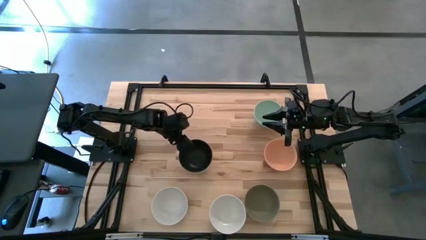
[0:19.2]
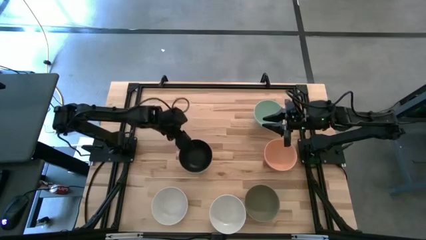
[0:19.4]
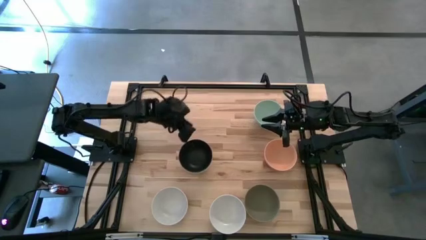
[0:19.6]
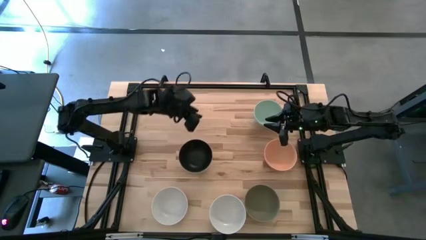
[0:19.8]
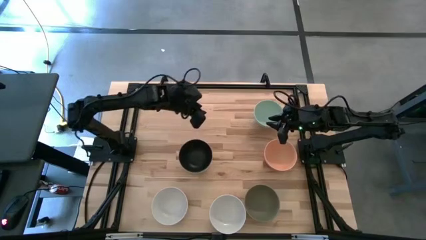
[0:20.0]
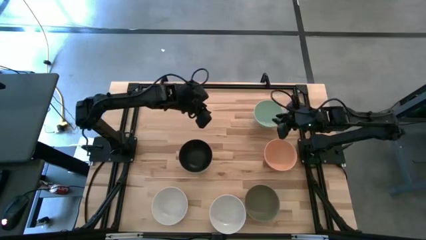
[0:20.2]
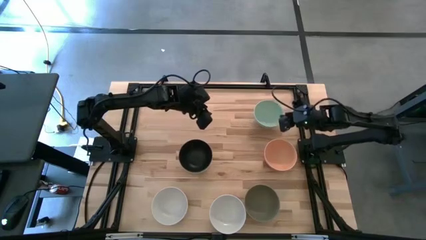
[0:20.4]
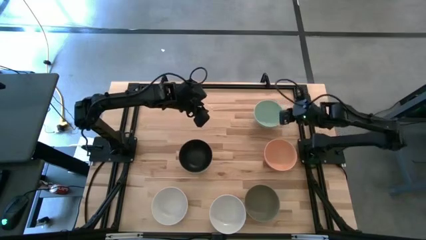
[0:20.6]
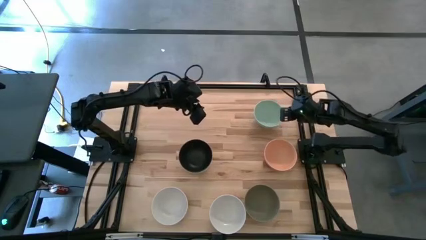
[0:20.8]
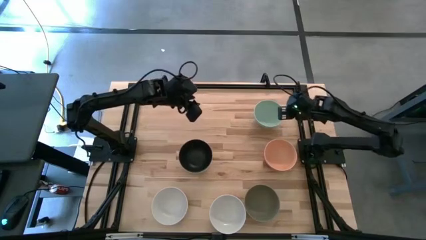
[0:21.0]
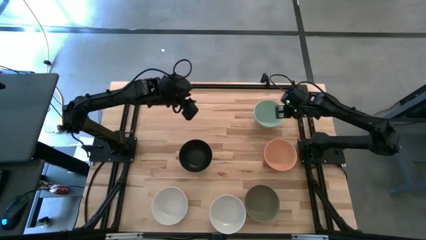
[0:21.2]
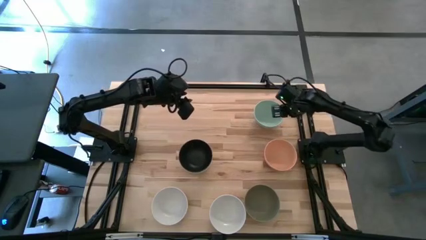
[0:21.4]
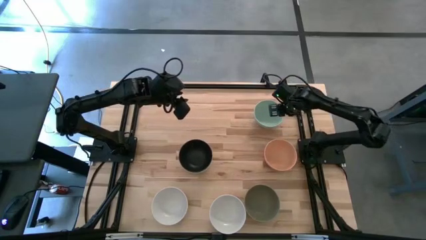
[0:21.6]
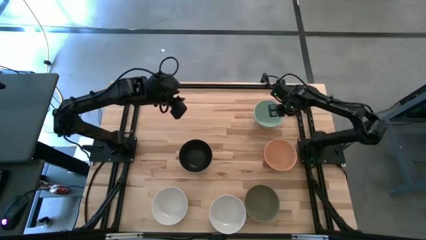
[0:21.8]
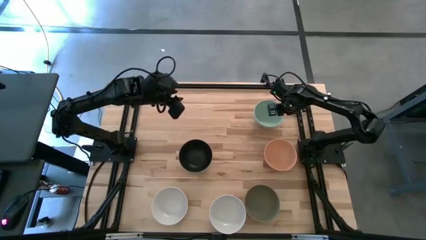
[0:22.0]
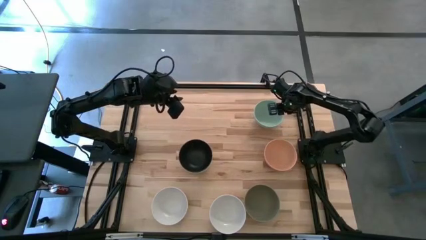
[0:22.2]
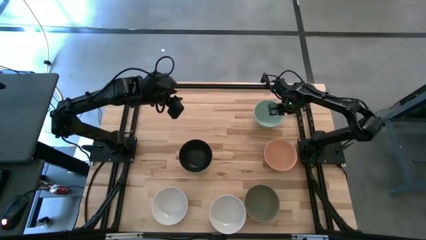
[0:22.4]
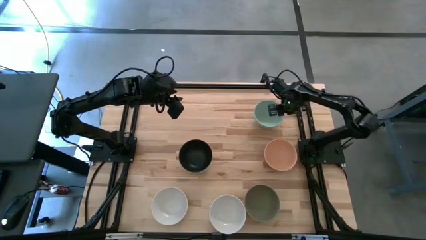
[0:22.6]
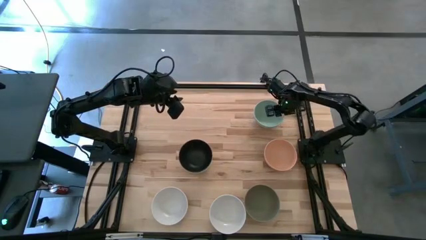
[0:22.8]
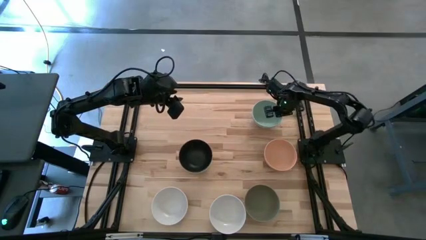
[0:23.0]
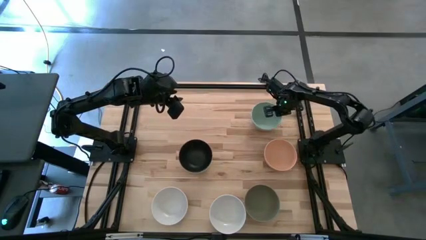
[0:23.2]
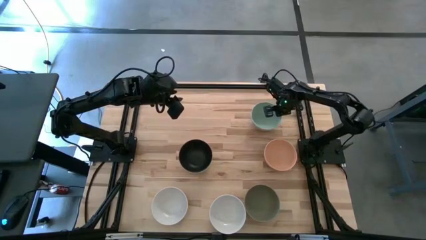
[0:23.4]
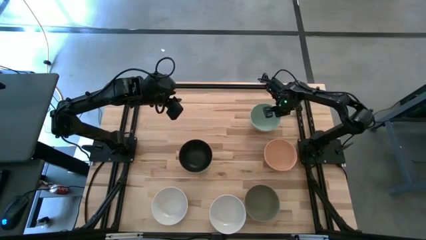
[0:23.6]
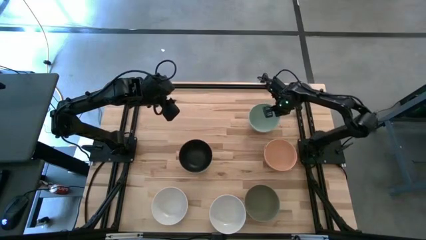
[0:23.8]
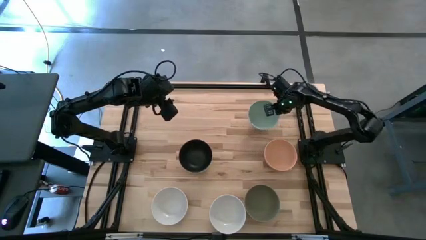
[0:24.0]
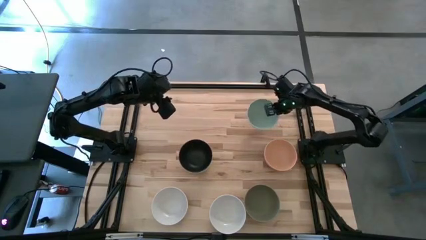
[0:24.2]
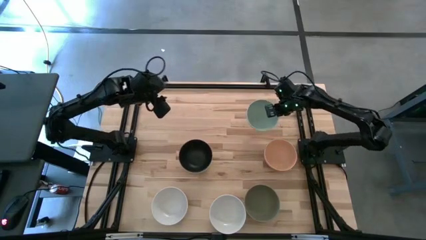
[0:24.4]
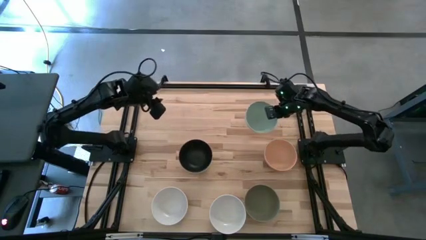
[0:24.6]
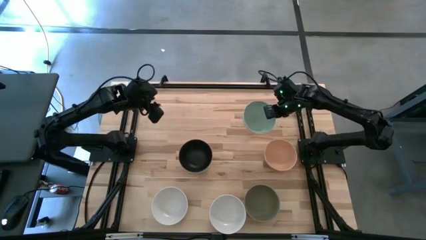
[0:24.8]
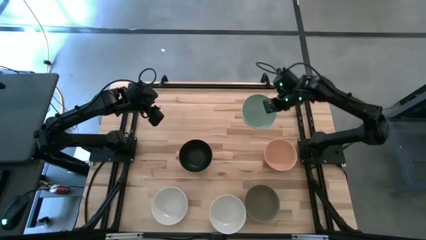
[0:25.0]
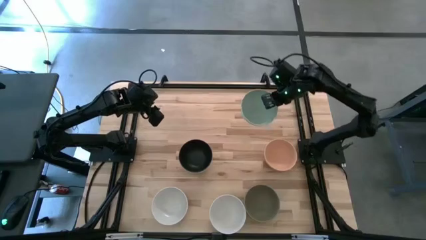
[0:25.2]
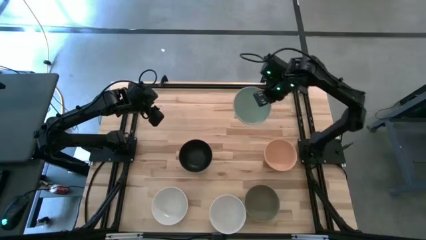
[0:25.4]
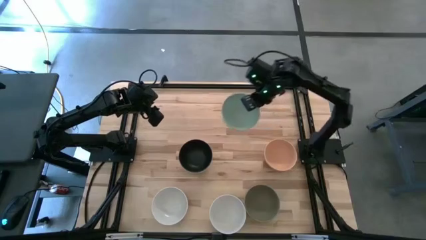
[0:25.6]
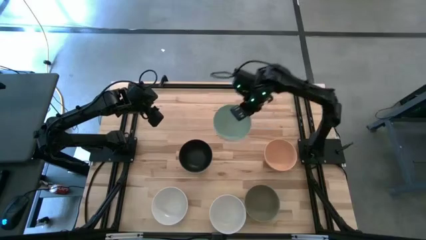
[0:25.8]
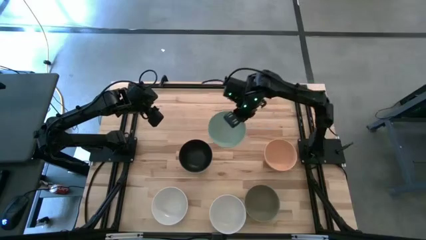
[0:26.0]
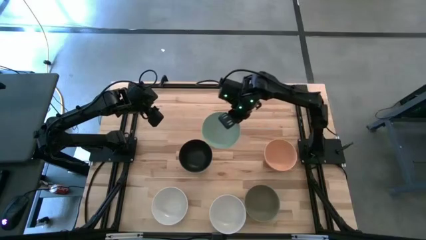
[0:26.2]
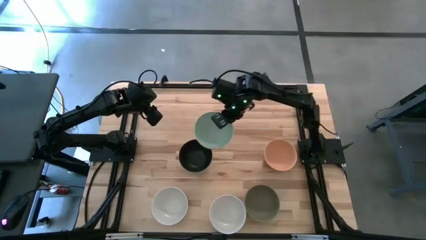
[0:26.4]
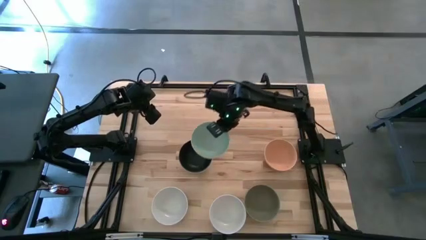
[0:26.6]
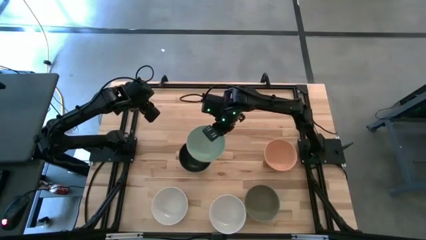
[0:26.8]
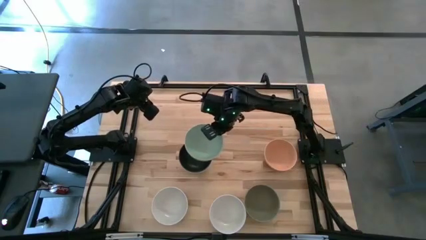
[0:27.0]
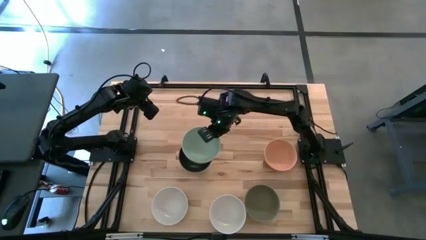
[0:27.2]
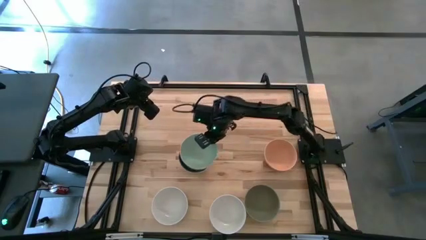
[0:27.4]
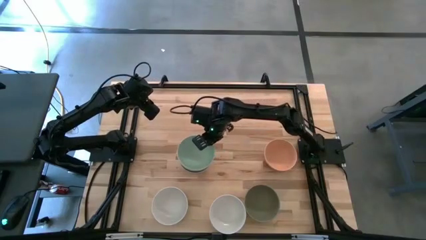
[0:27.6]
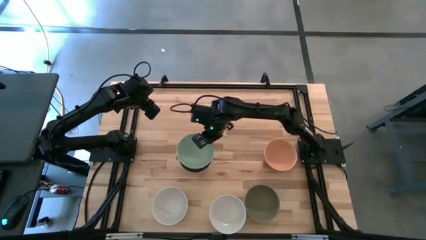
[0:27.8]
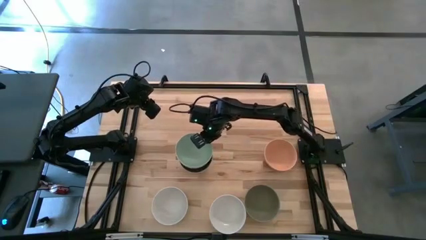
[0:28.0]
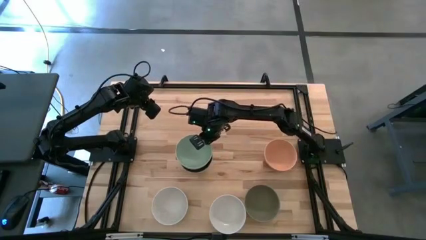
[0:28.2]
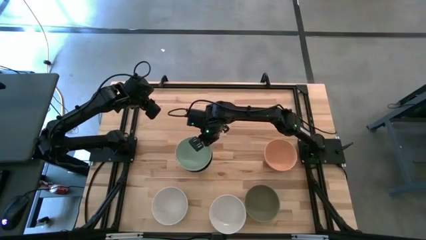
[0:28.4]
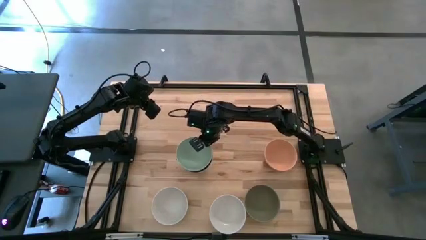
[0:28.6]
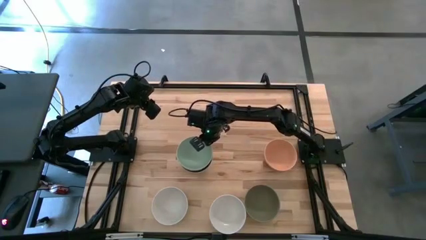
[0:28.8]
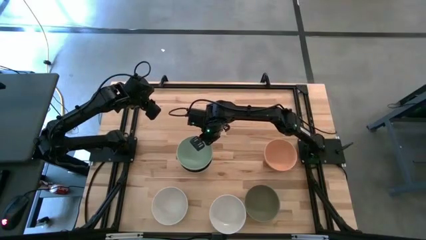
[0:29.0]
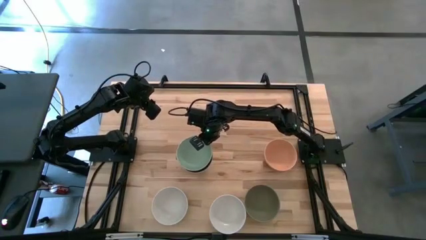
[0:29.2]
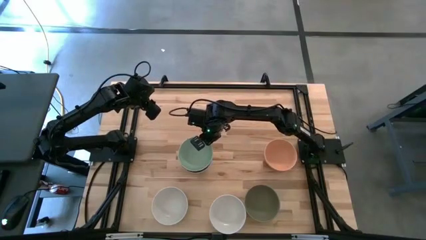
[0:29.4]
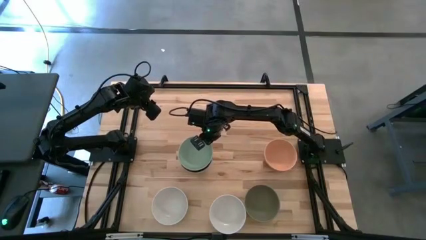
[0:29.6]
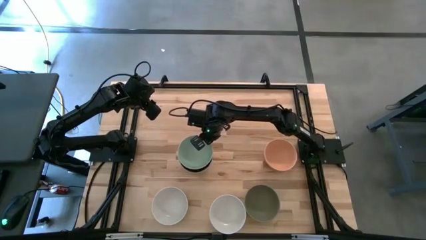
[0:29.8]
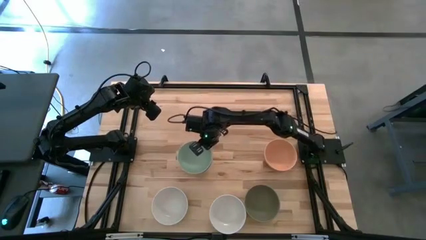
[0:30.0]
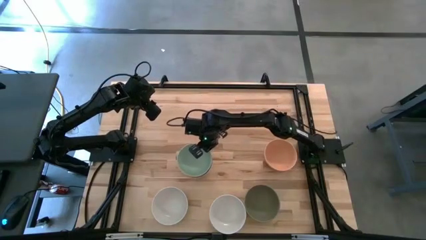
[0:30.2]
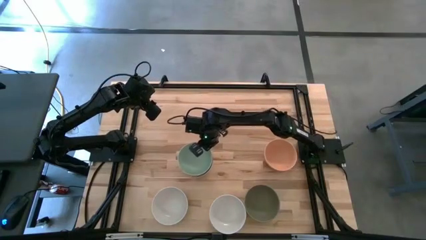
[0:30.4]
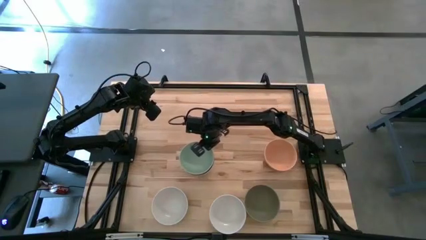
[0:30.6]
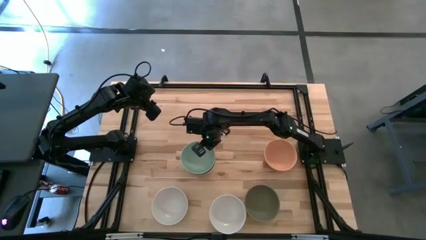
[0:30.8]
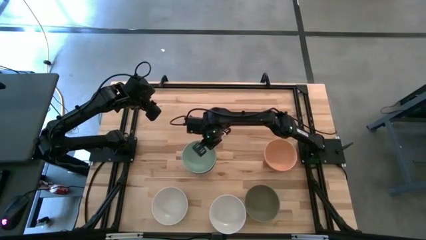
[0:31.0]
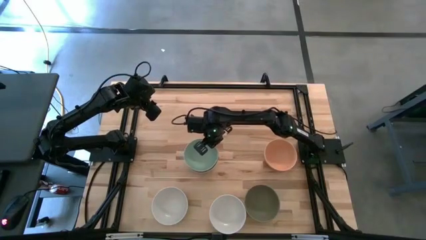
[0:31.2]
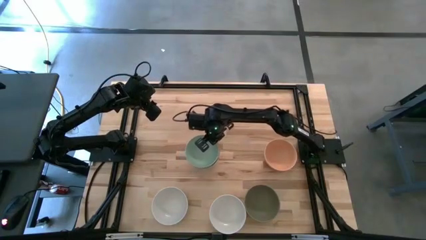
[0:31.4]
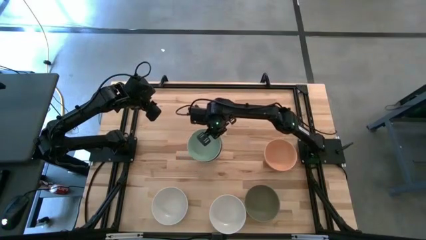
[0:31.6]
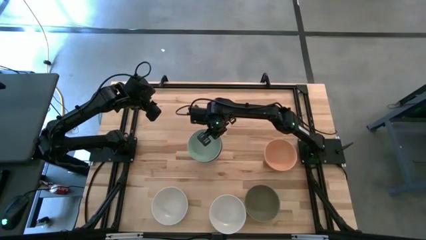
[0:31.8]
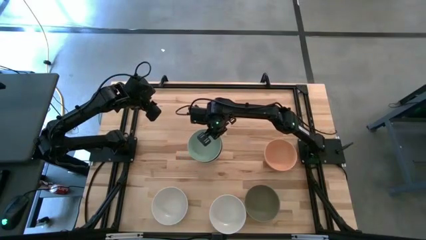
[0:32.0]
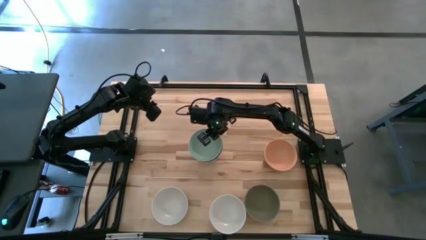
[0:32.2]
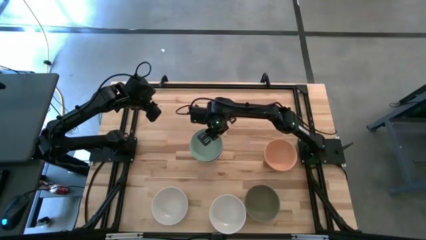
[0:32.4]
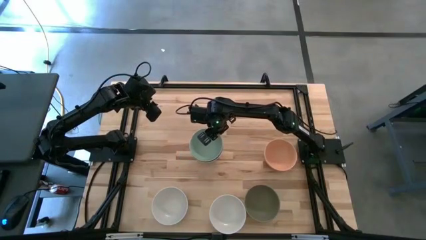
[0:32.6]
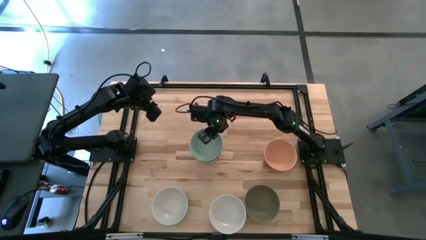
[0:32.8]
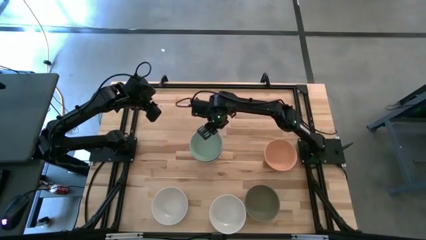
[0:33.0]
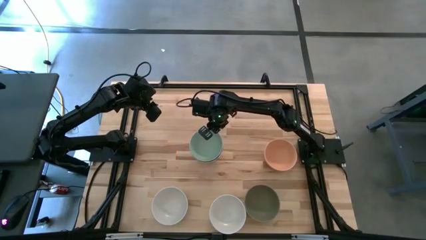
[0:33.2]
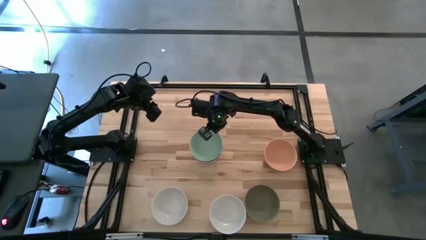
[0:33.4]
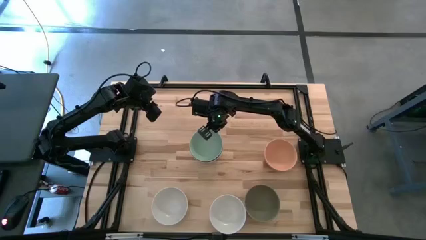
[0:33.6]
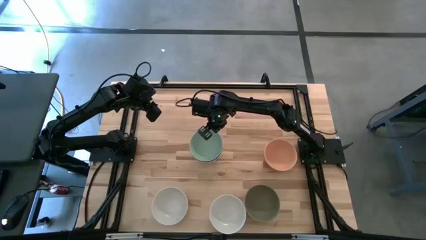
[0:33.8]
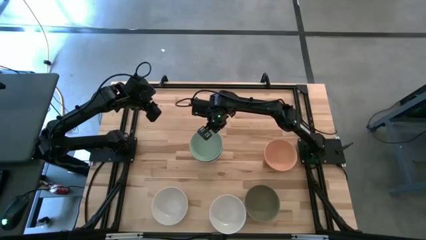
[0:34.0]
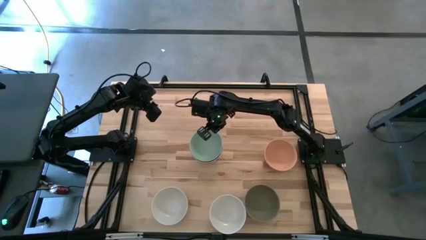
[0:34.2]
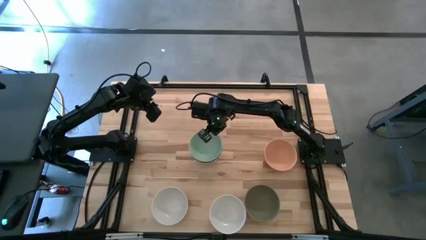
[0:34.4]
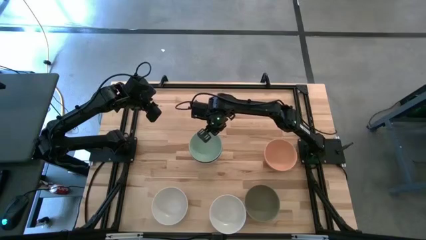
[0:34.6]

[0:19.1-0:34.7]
Task: Nest bowls inside each other
Stack the green bowl on the black bowl
